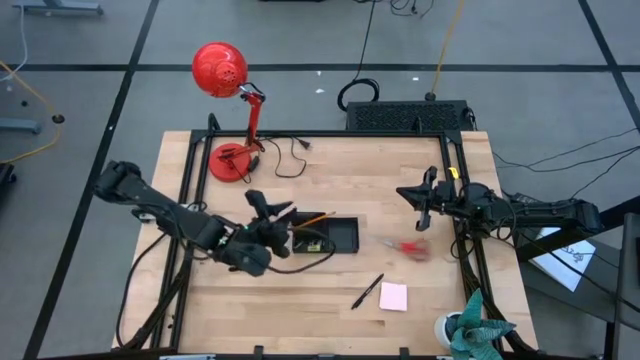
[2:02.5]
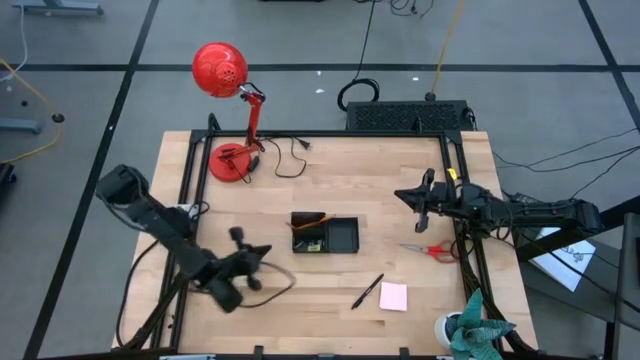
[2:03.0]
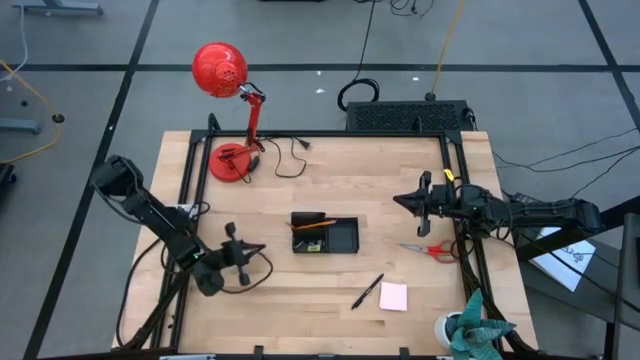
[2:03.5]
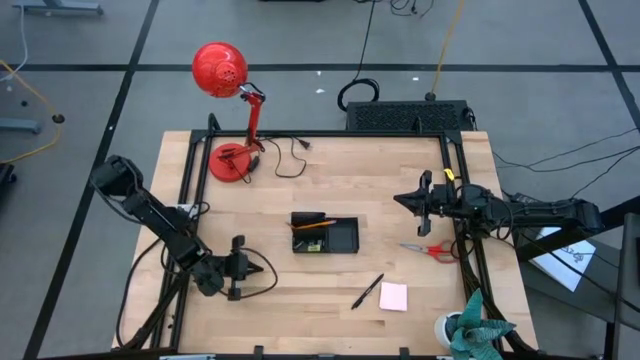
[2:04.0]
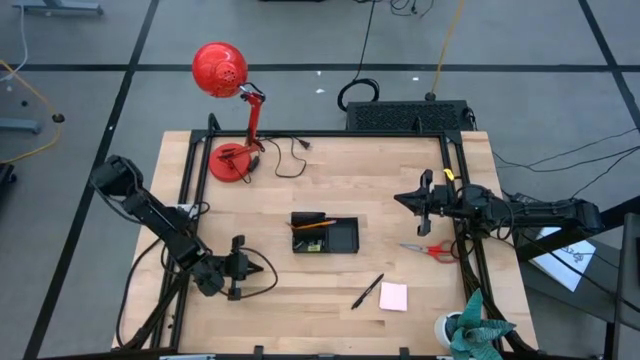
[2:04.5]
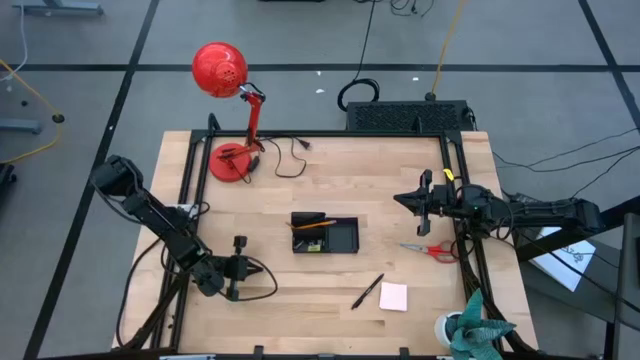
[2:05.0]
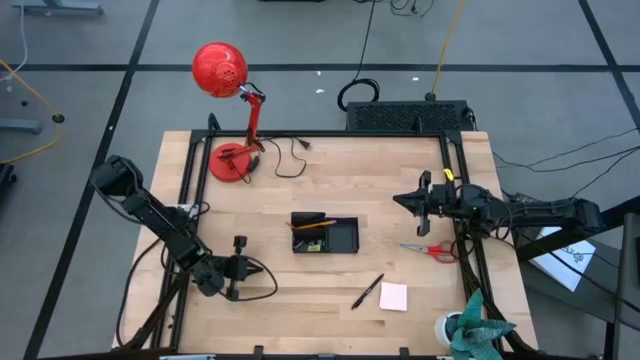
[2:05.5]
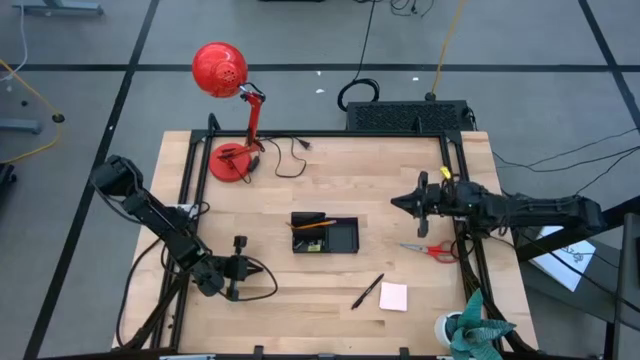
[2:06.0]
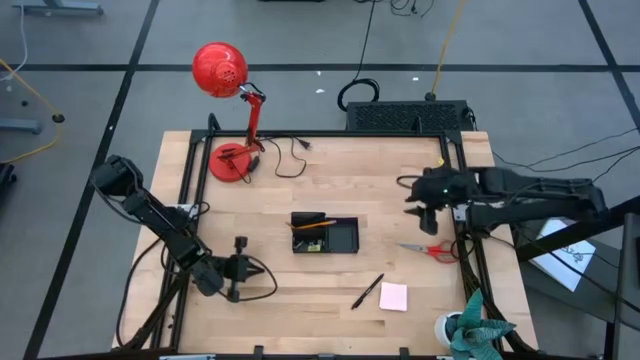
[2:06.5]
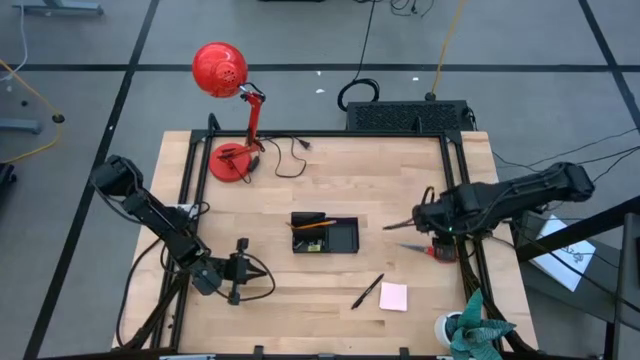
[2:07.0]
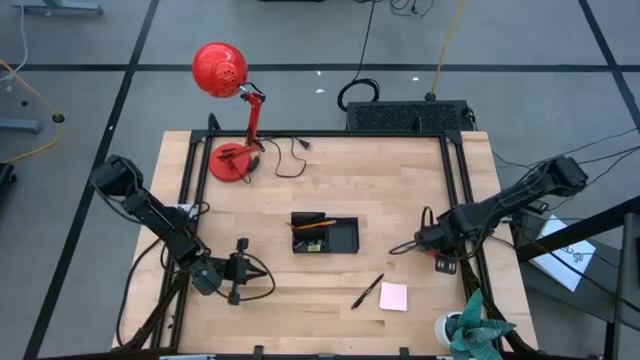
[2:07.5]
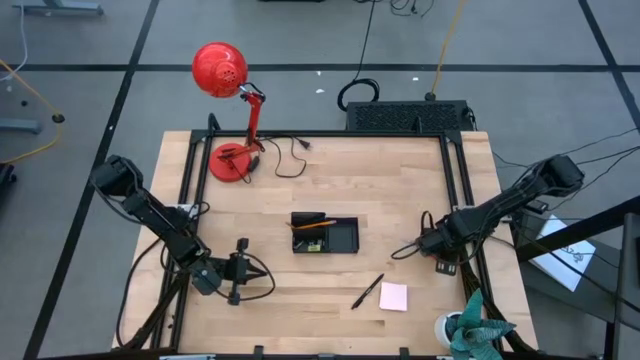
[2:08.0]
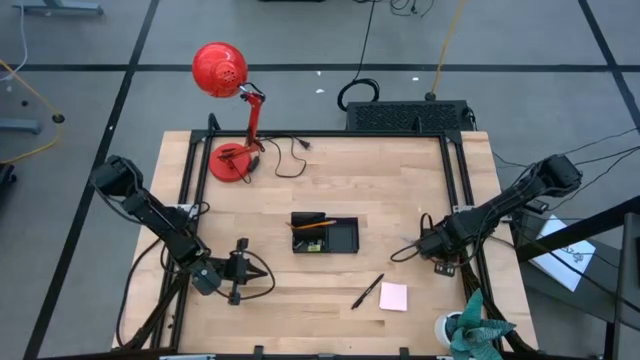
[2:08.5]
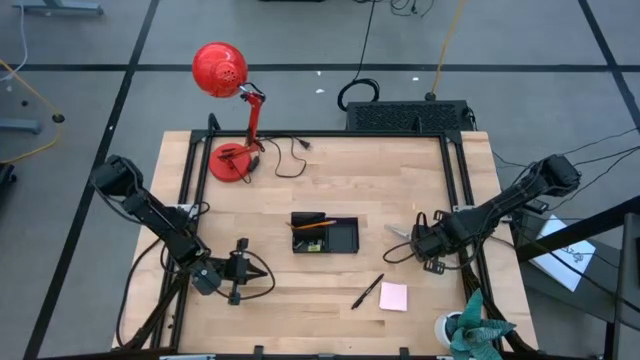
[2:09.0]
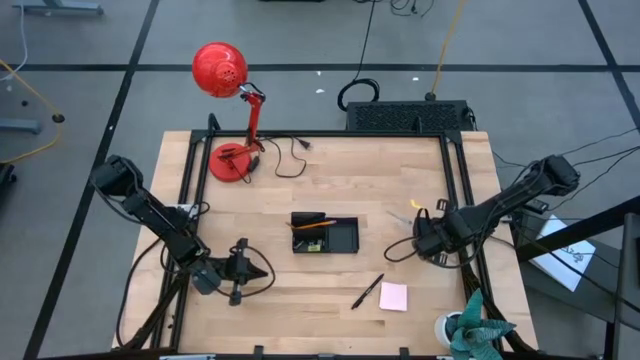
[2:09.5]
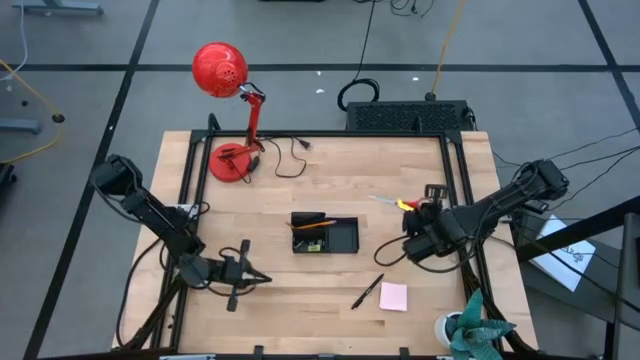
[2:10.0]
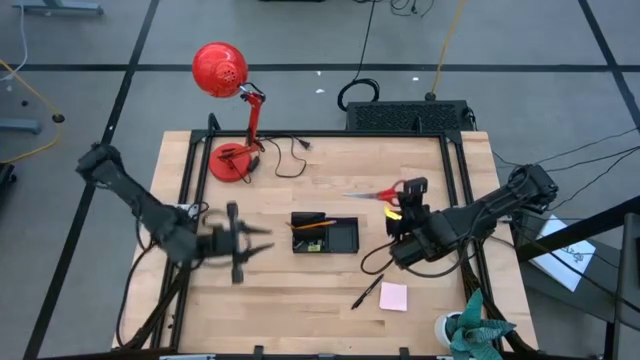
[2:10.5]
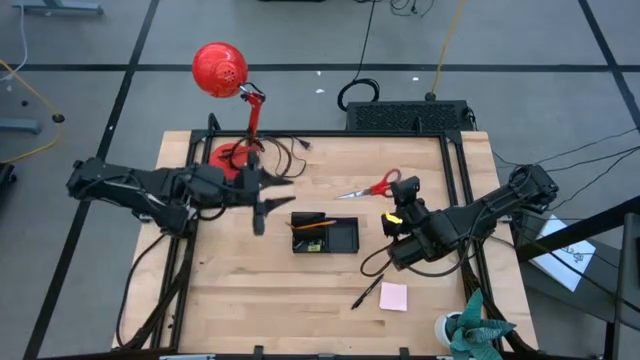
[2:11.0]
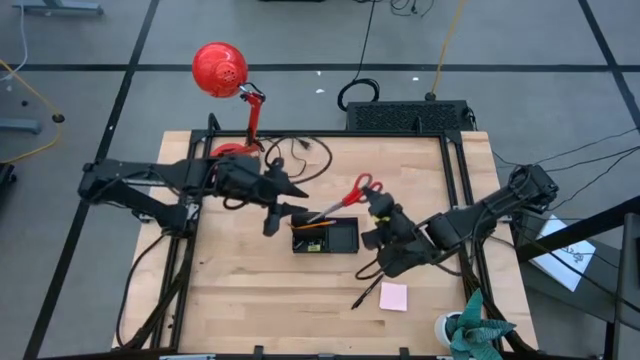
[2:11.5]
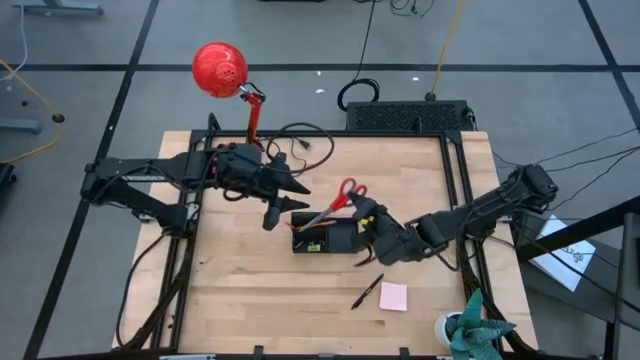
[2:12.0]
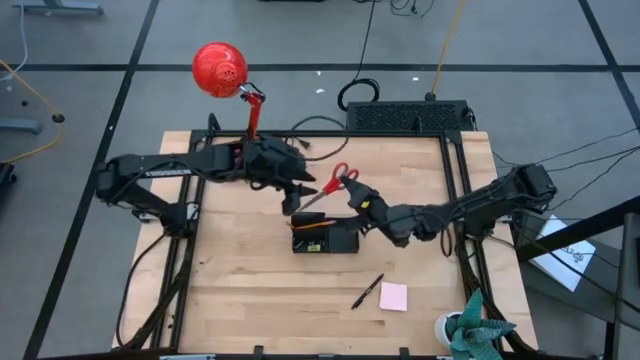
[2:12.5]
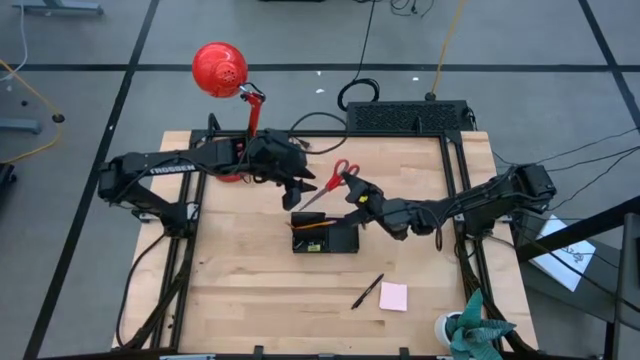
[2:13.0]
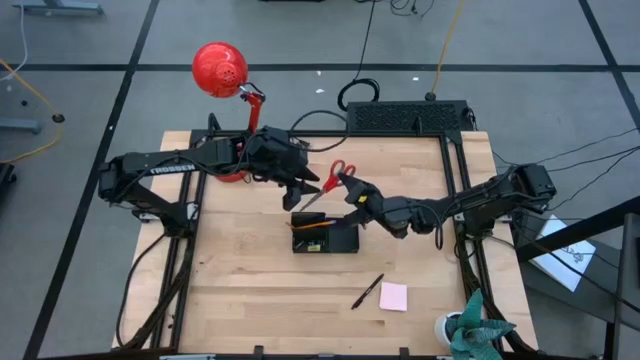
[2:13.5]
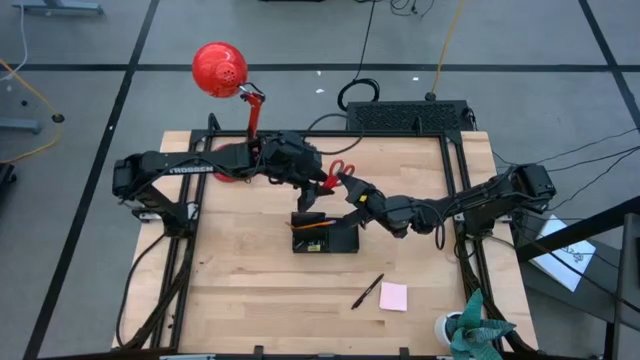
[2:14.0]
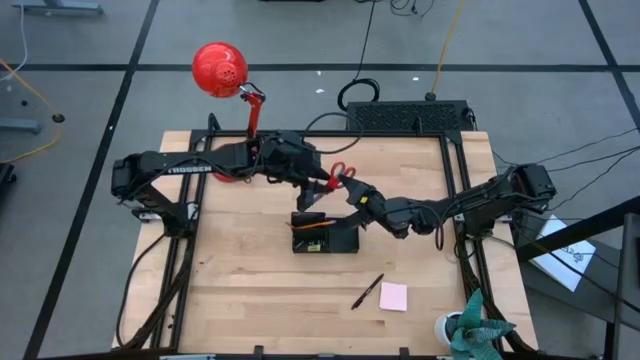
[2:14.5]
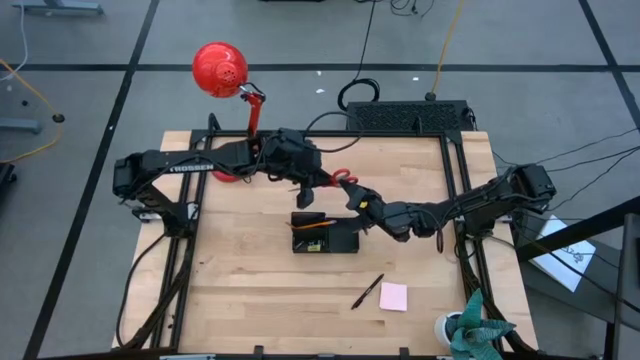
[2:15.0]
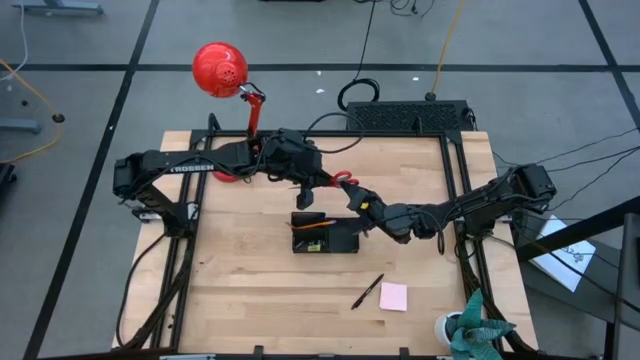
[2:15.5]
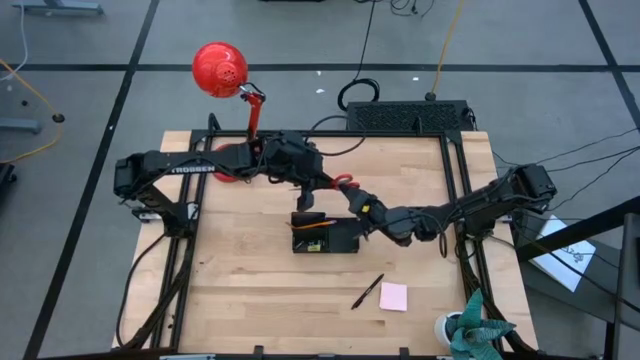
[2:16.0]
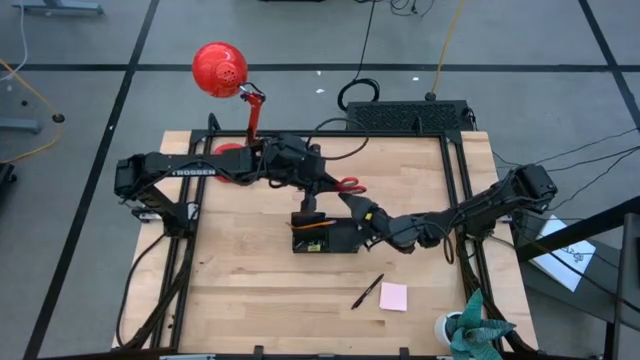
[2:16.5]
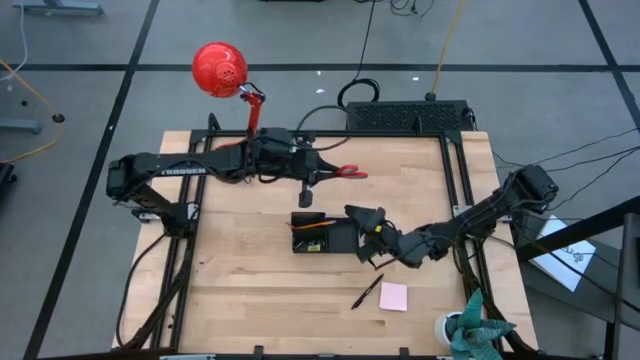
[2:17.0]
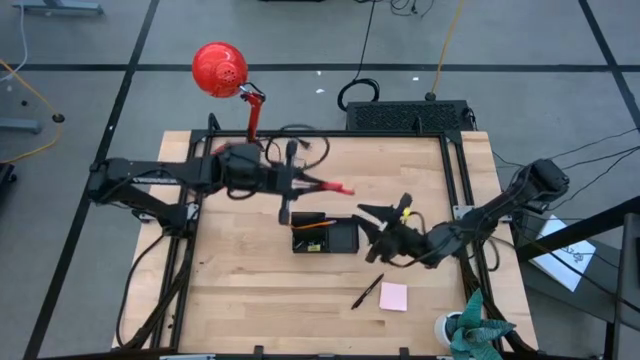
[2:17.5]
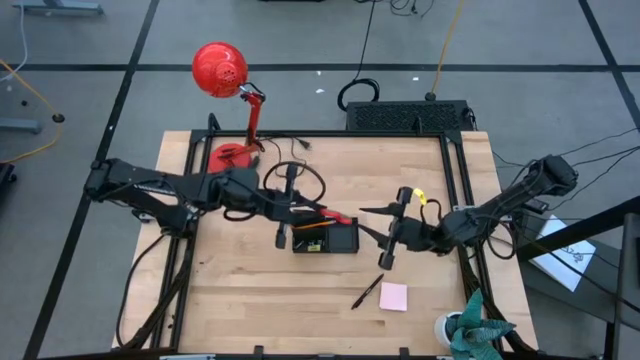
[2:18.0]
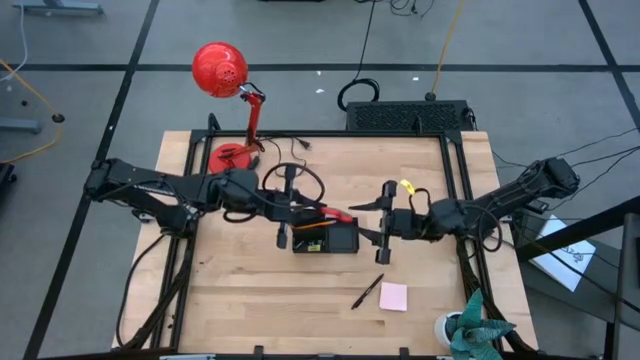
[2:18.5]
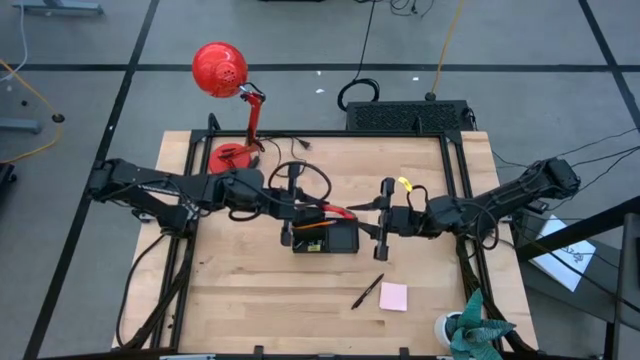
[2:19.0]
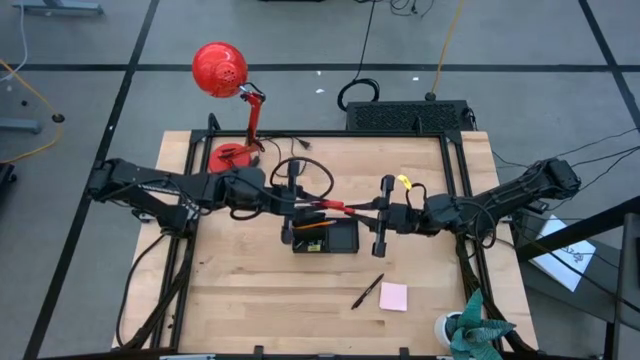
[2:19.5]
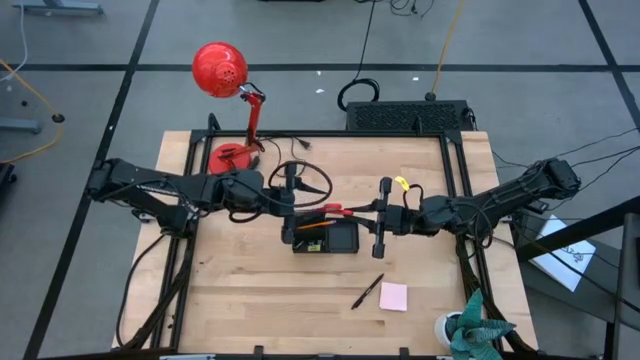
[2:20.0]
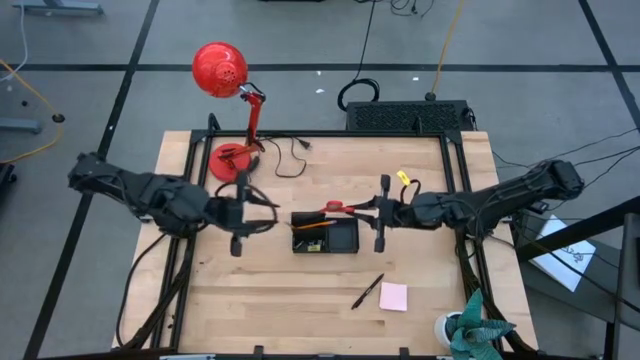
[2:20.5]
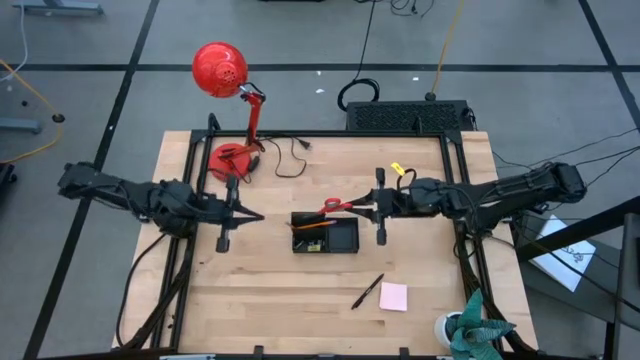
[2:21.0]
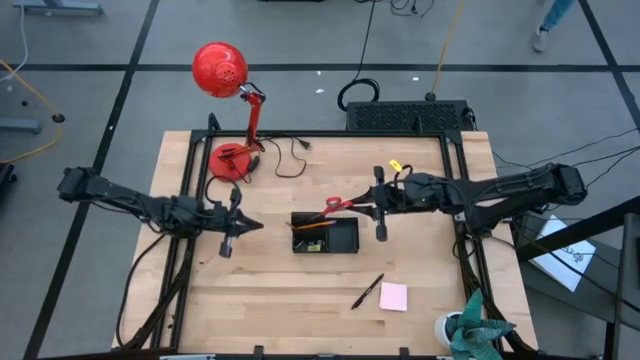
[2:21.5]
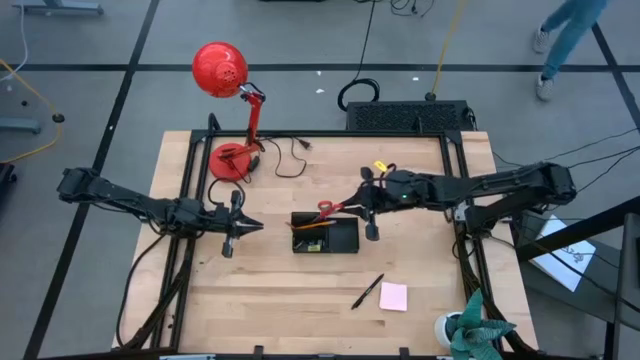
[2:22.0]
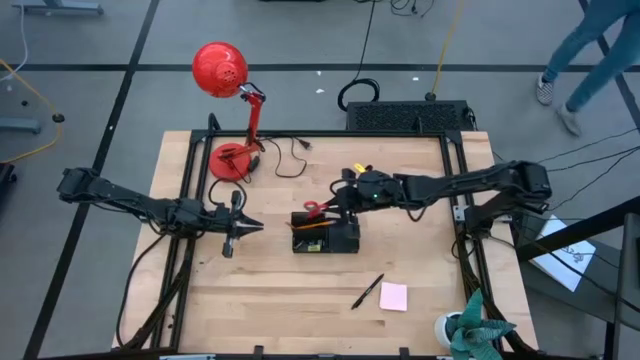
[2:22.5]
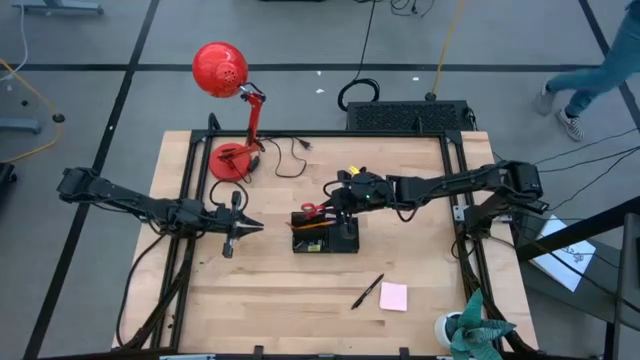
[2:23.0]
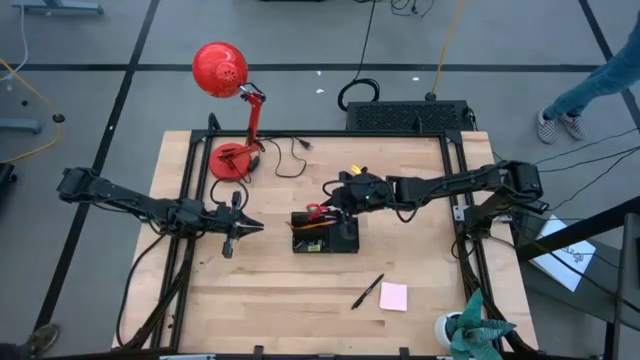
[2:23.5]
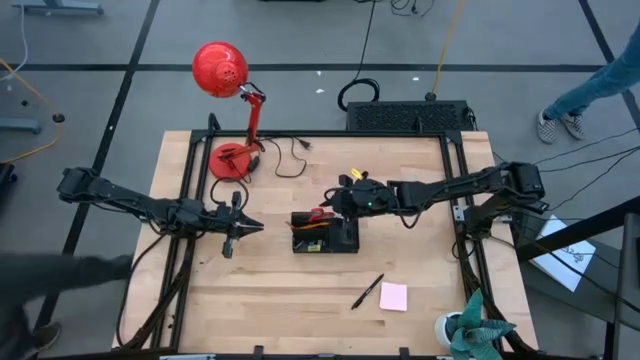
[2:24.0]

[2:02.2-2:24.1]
Task: Pick and place office supplies into organizer
Put the scissors into the top left section of the desk organizer
